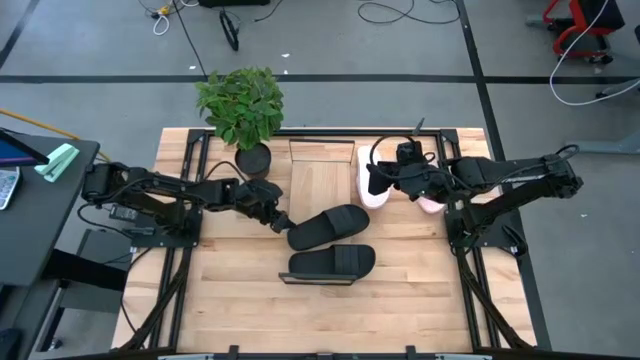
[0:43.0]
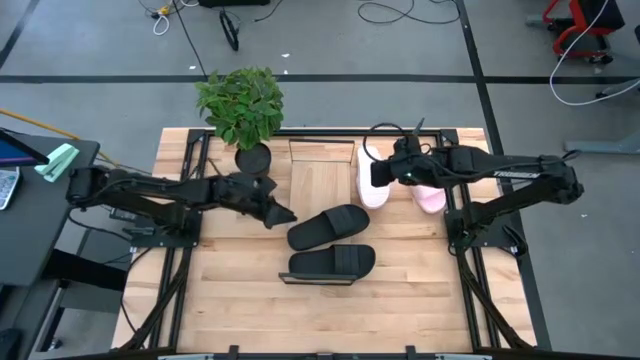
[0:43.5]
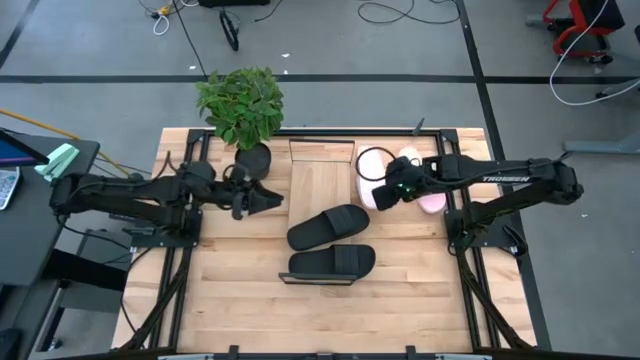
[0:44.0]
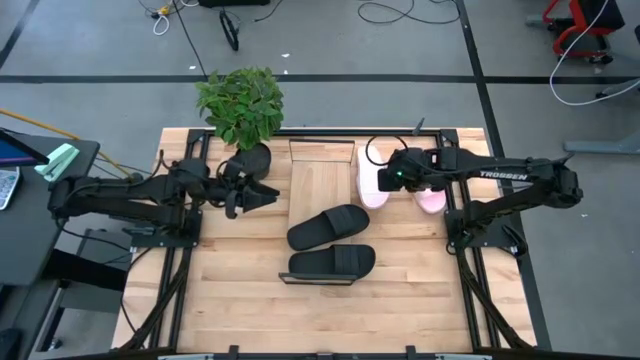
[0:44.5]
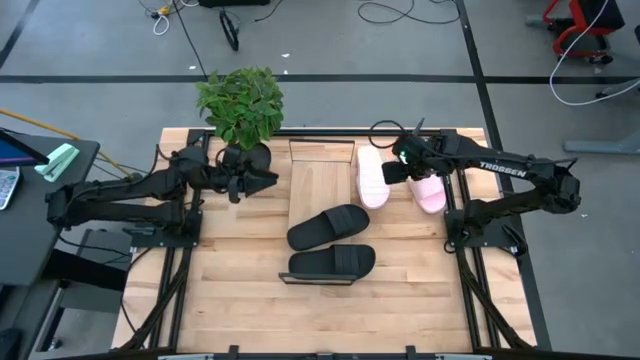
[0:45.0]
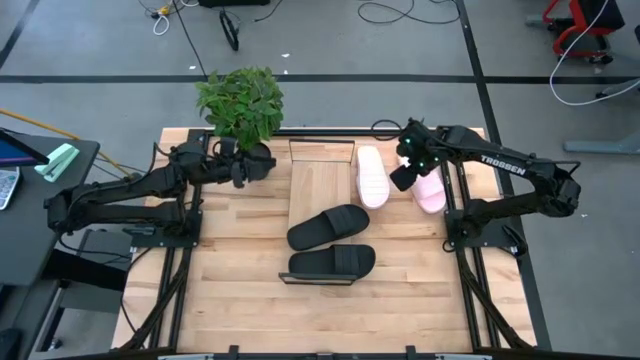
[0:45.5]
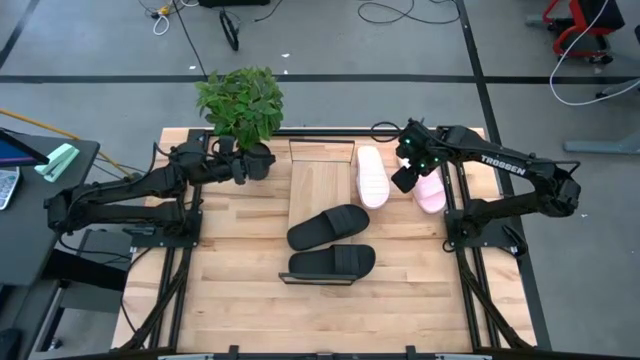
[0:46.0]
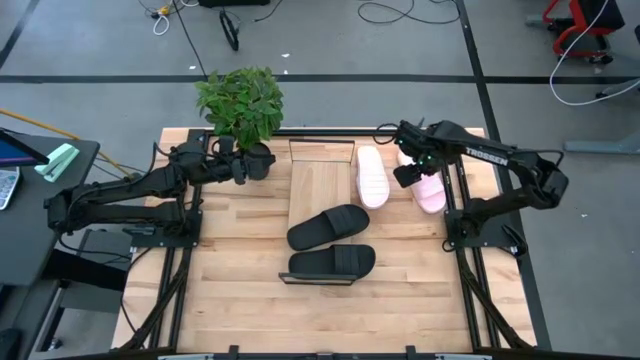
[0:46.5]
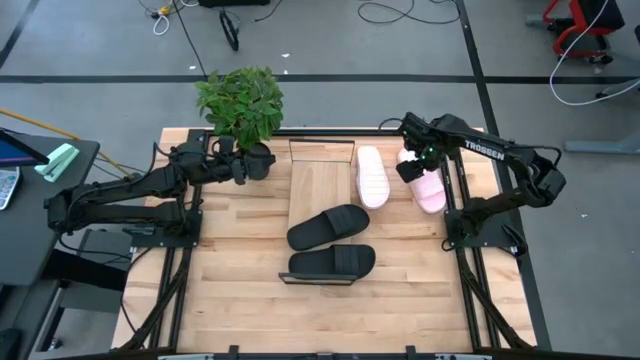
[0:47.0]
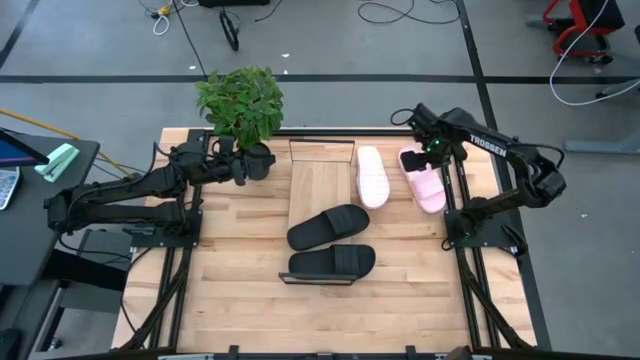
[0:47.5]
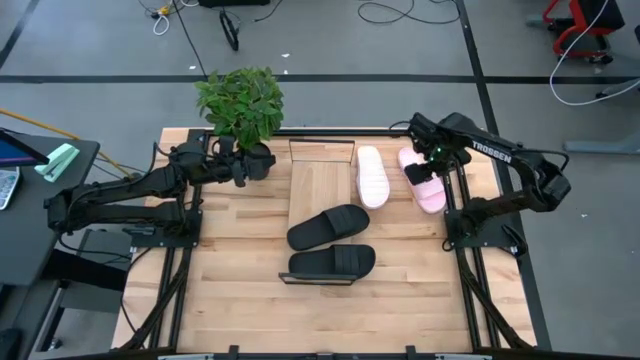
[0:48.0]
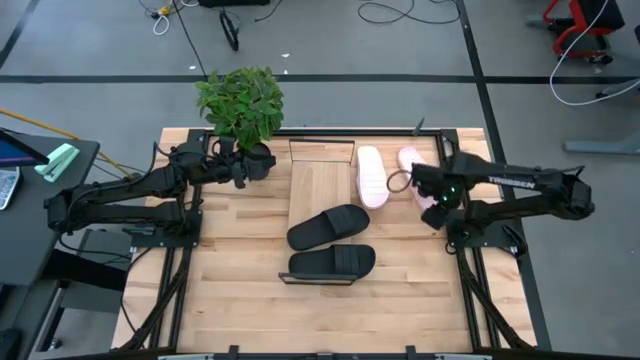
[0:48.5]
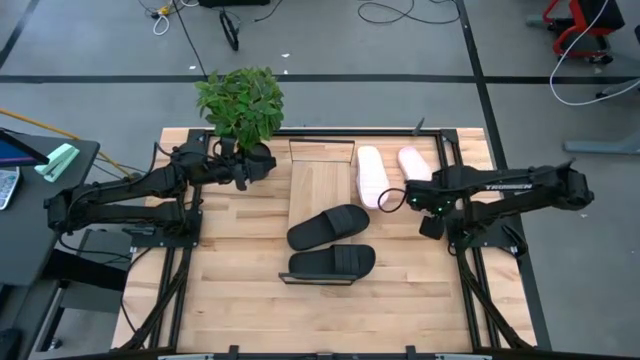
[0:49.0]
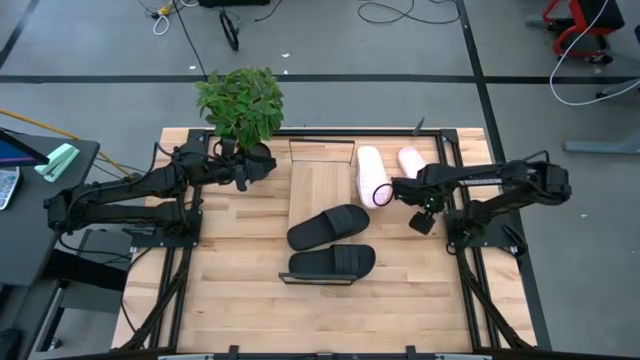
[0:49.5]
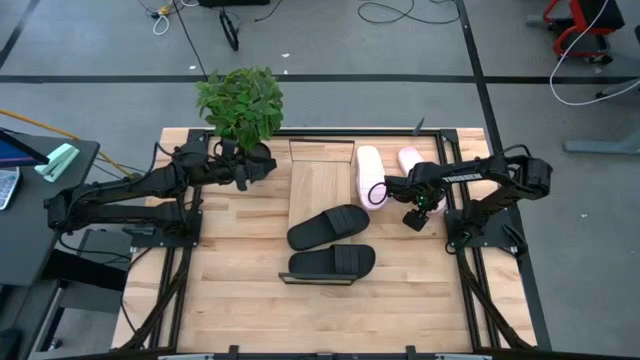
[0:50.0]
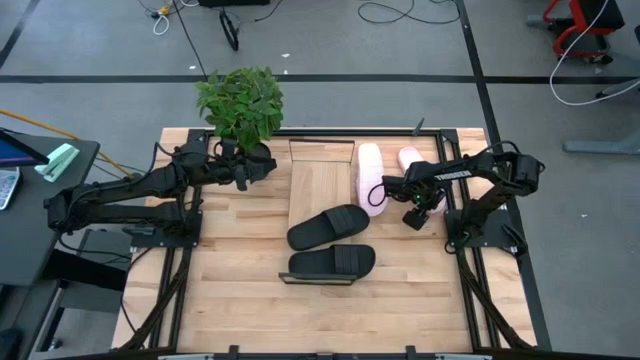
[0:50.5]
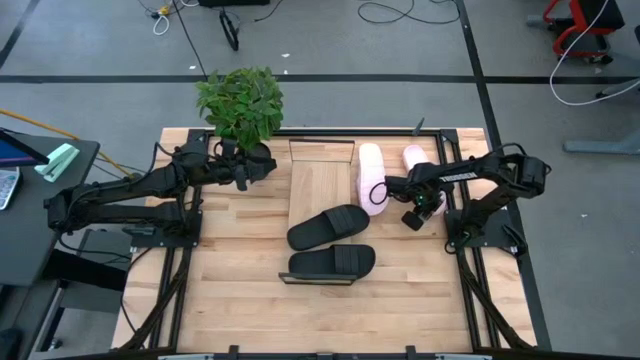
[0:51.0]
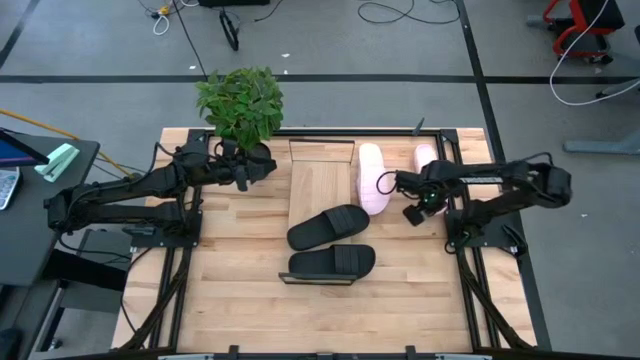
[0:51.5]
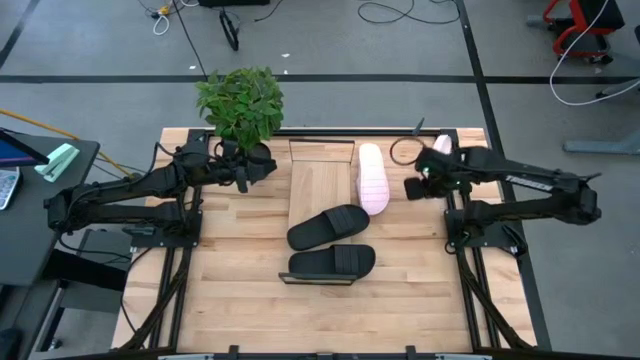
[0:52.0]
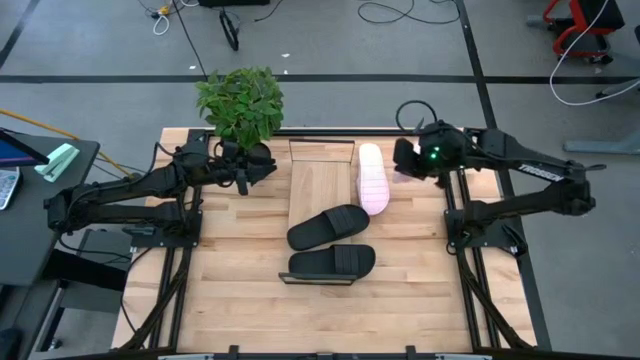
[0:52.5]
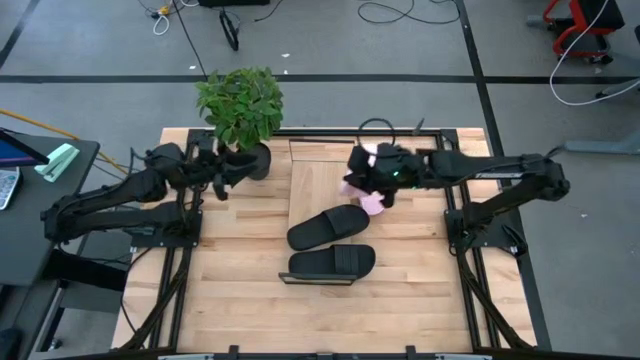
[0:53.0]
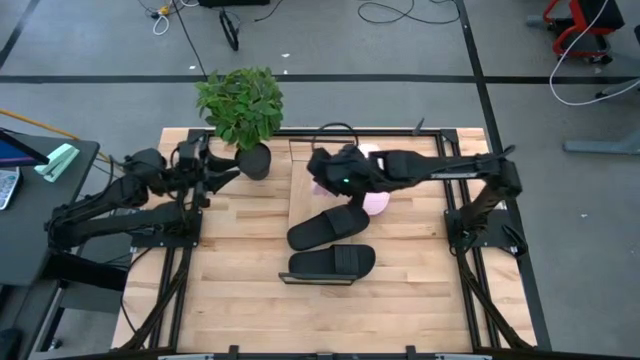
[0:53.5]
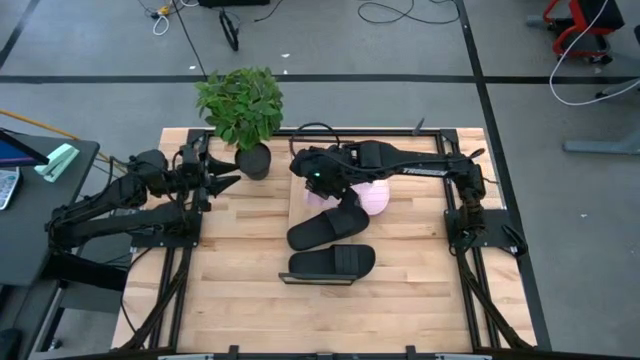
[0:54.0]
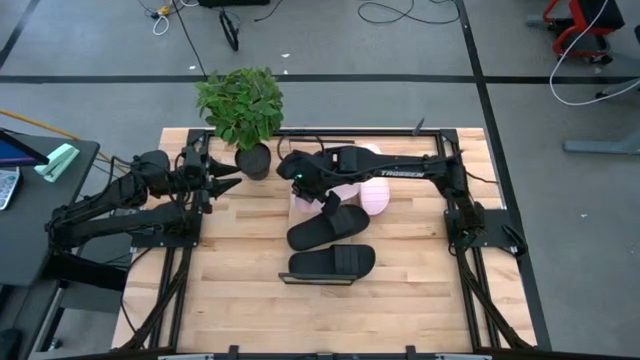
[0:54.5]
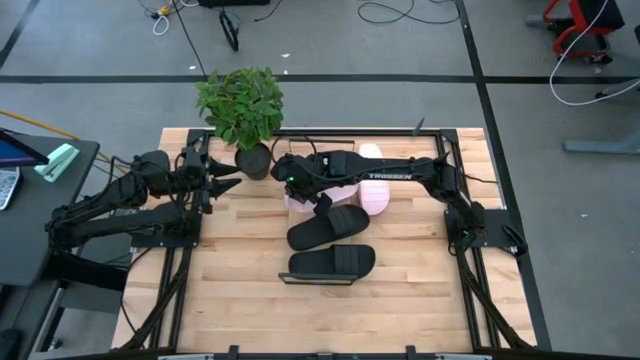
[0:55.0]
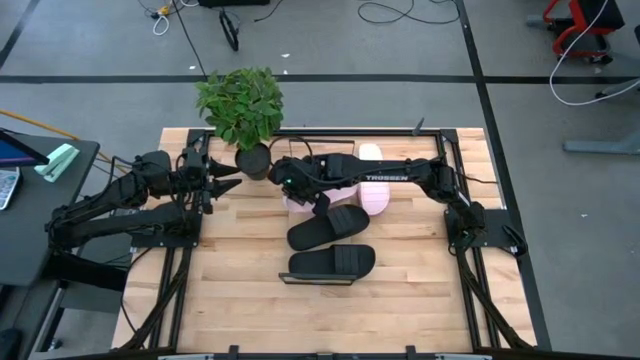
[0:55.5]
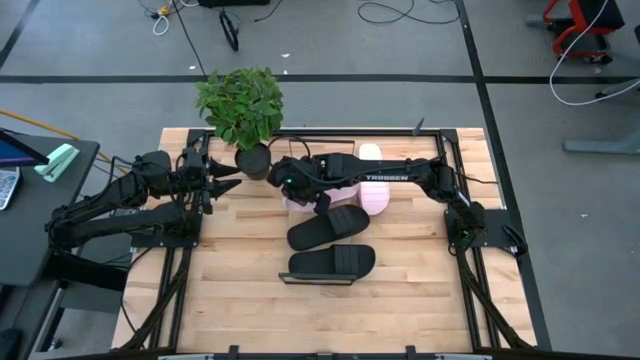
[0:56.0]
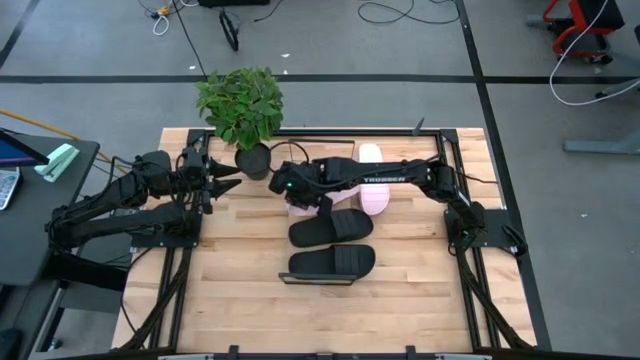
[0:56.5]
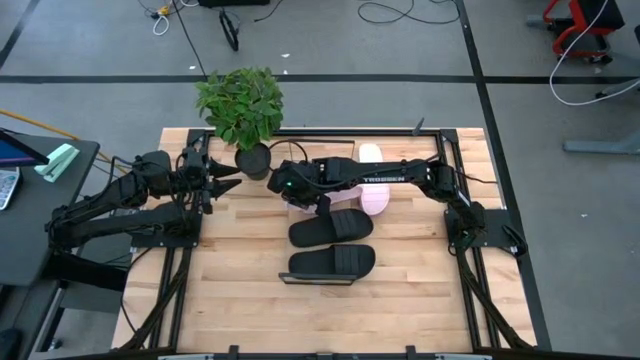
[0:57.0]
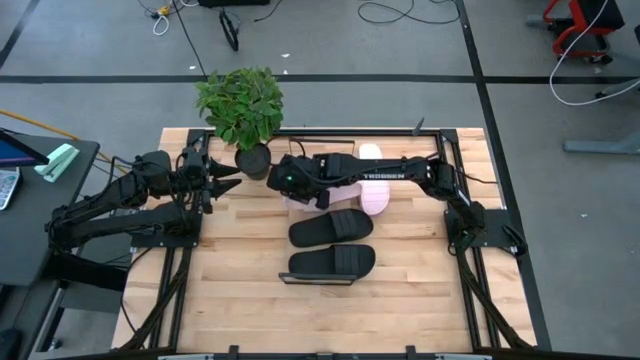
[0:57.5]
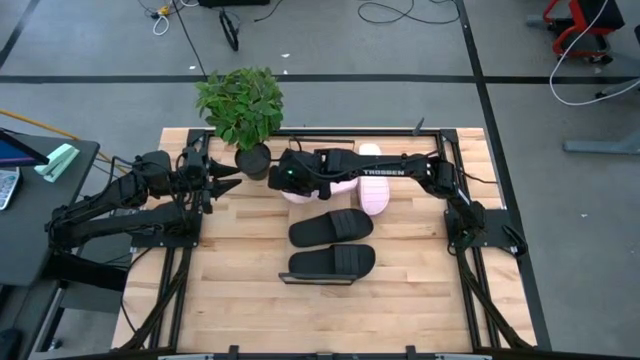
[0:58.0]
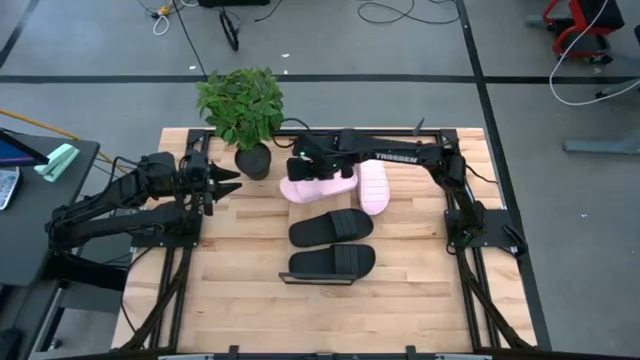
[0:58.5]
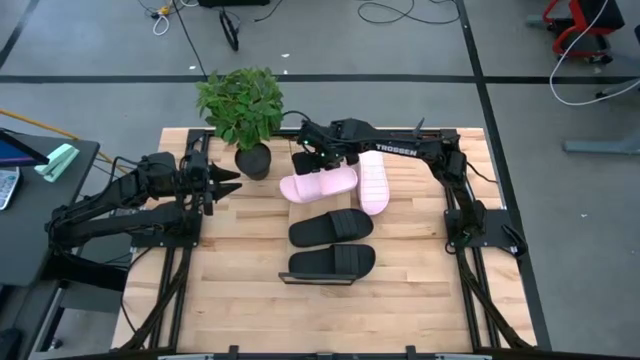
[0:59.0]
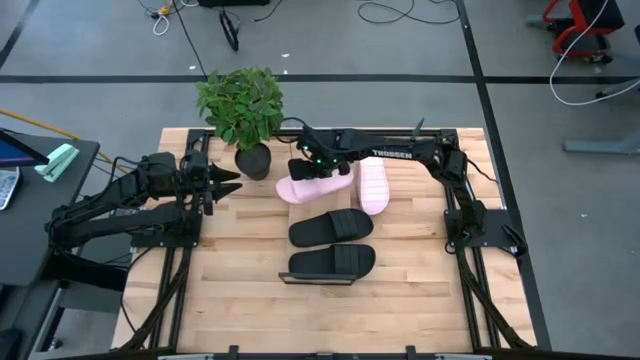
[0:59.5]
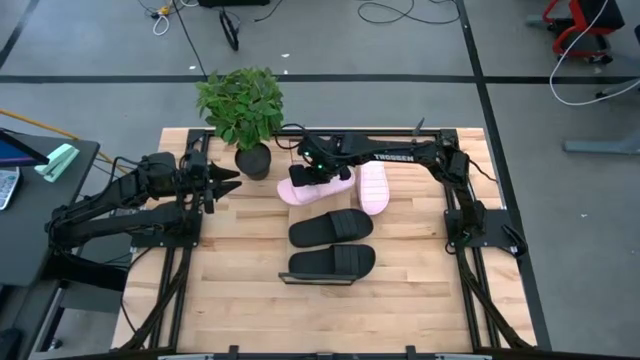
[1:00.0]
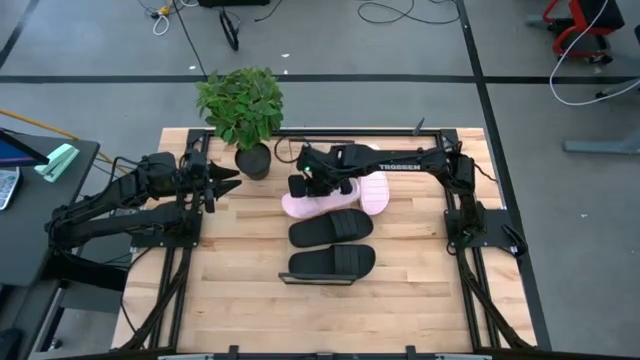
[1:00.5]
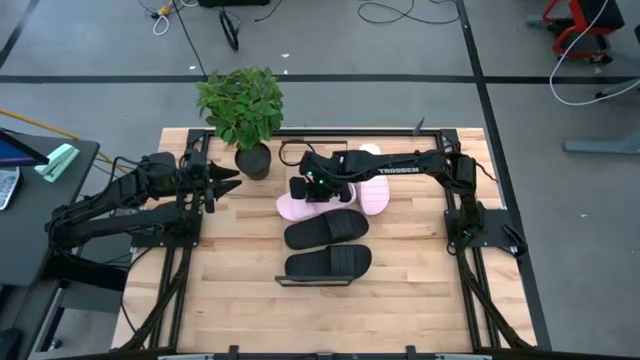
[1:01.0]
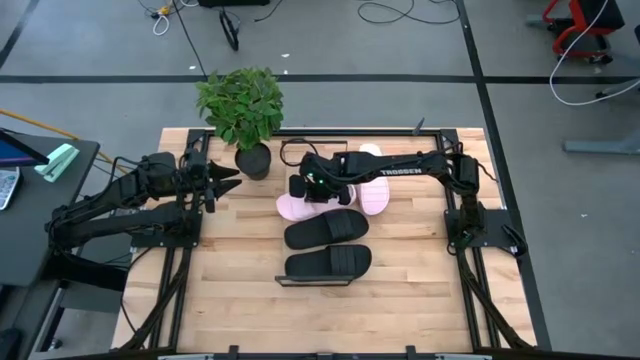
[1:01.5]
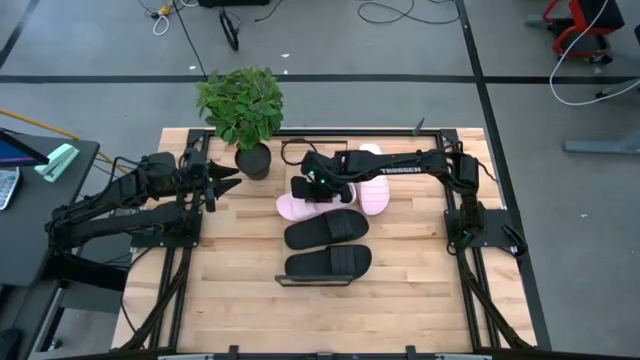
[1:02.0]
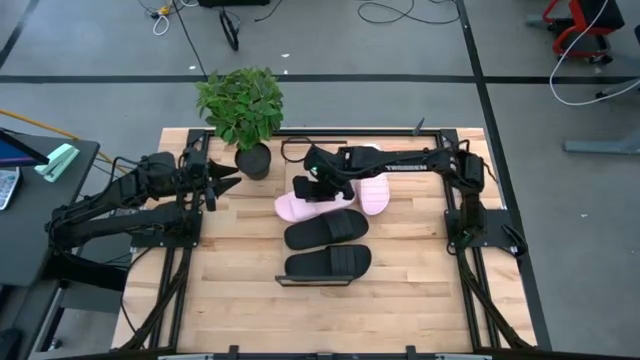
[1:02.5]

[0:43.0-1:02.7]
Task: Pick and place slides into the shelf
Put the right pink slipper on the shelf

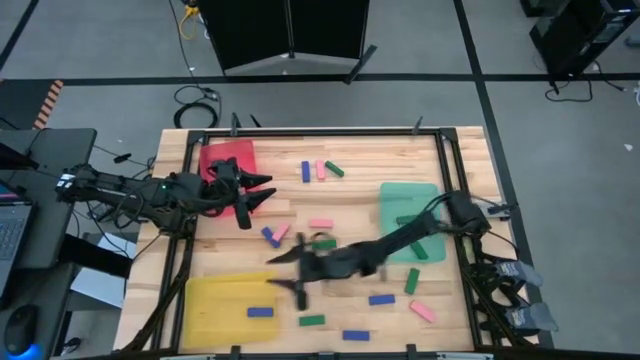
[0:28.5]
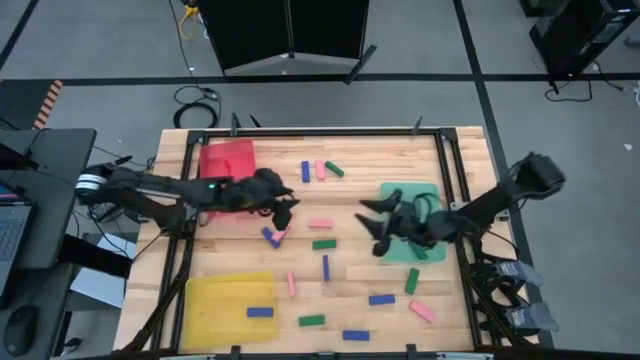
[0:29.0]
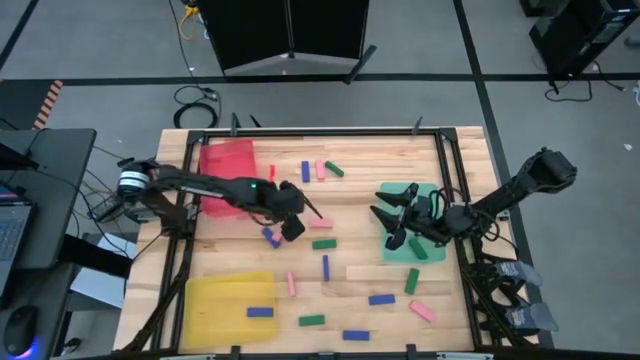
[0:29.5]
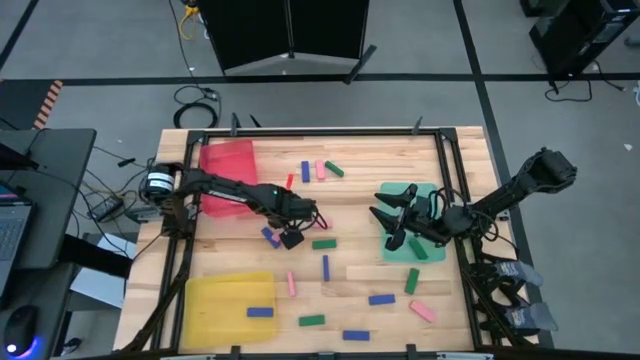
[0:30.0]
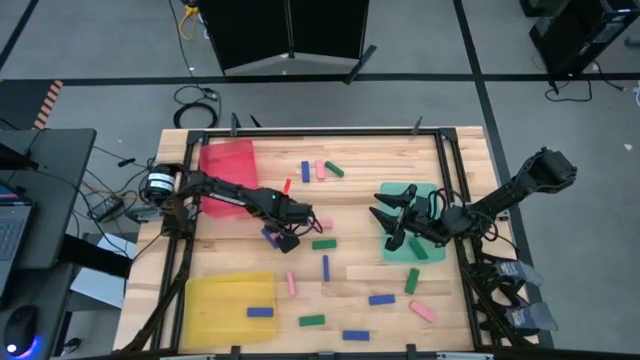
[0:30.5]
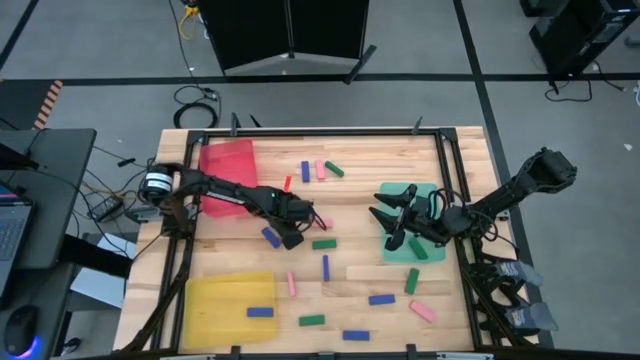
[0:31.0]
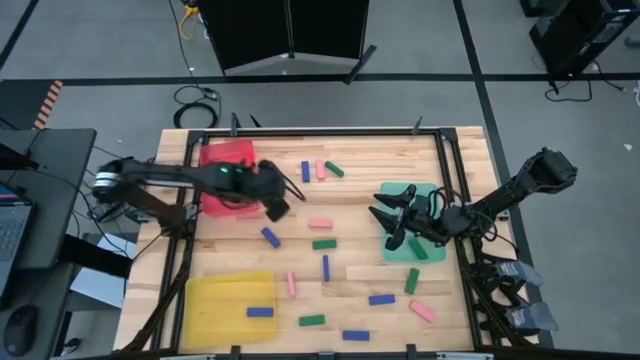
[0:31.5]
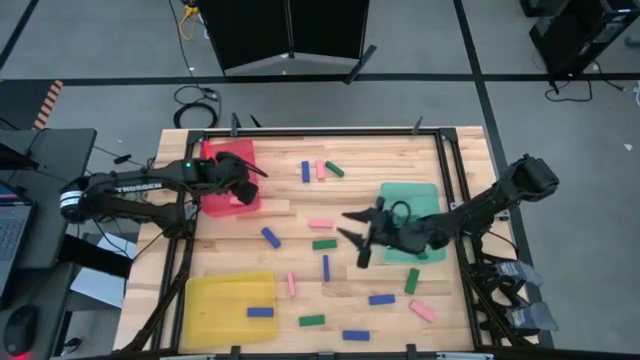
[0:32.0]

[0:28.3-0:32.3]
Task: Sort blocks
Put the pink block into the red bin
